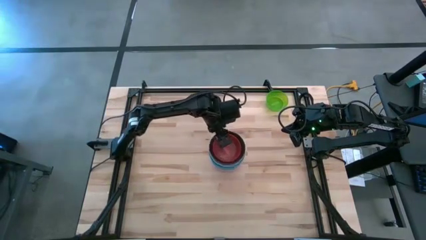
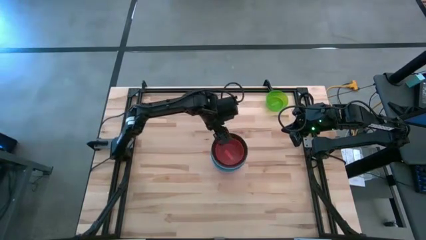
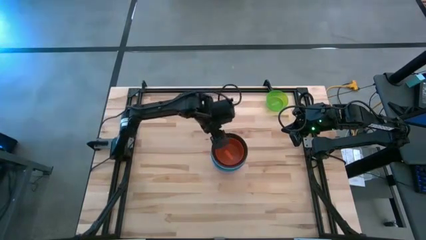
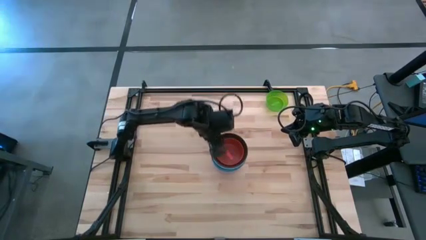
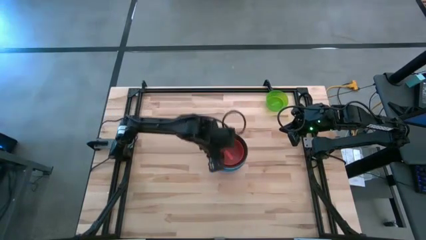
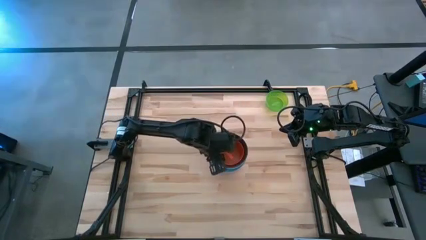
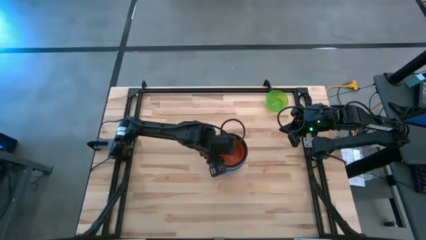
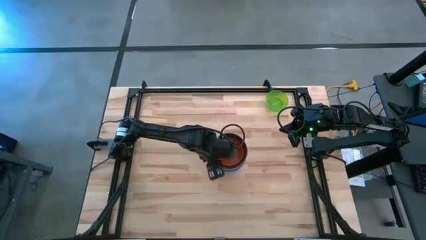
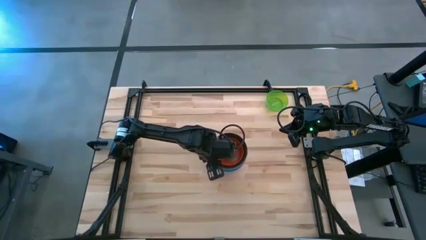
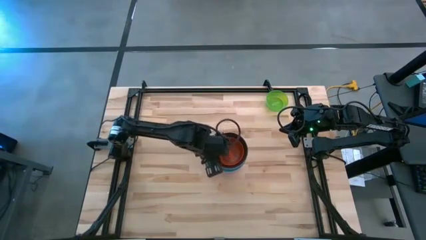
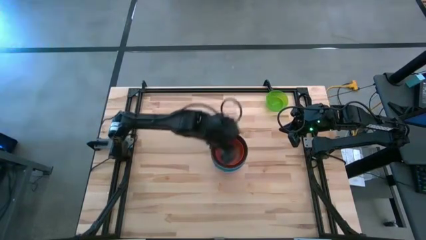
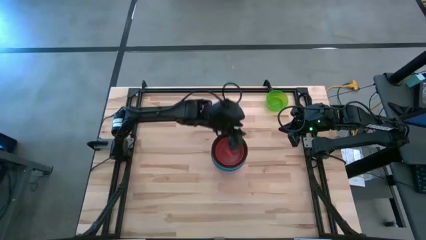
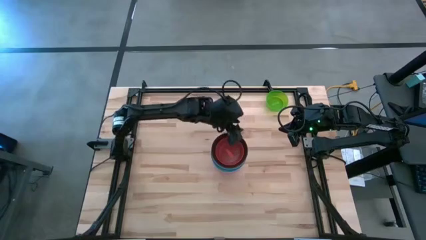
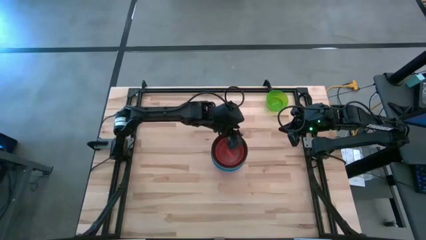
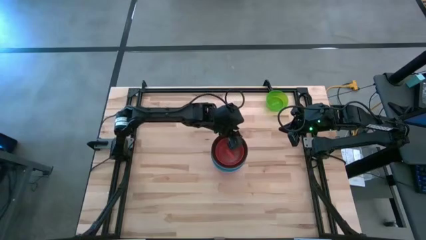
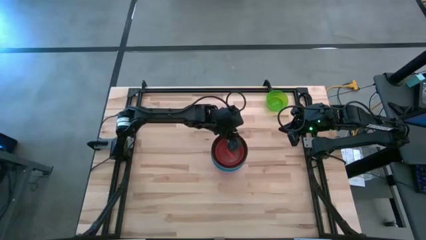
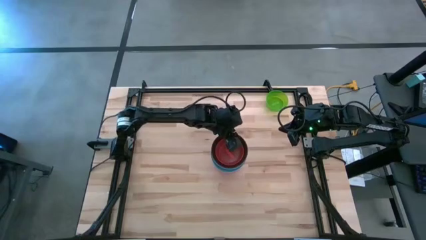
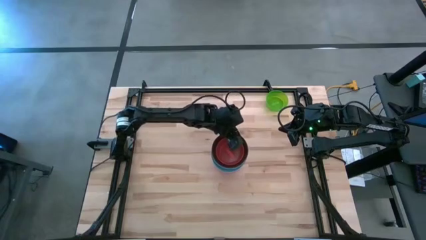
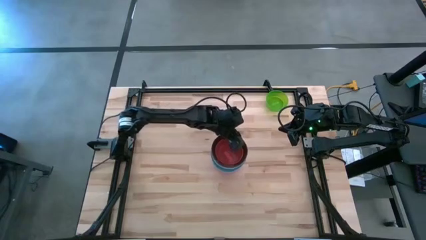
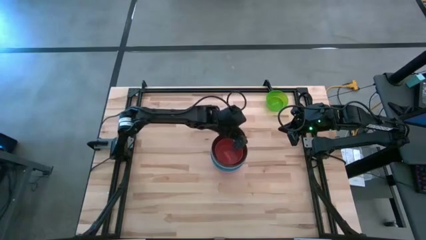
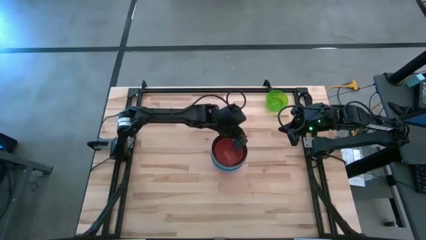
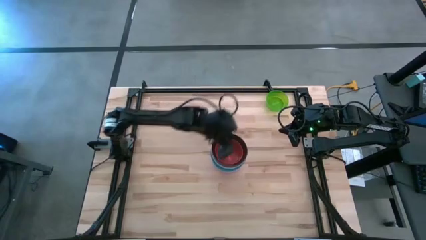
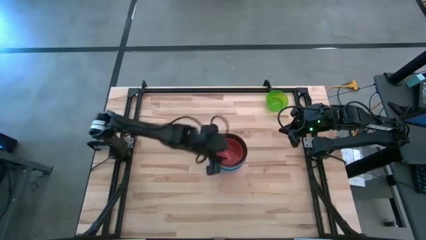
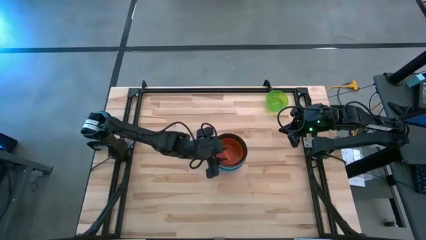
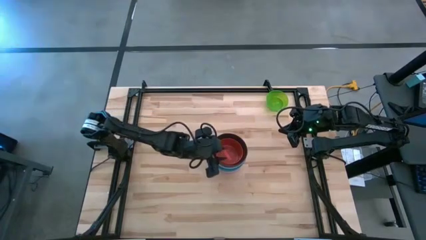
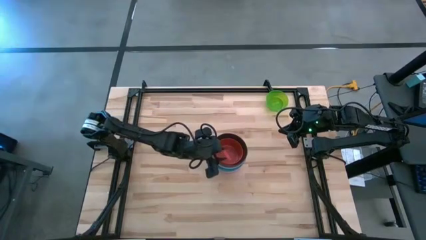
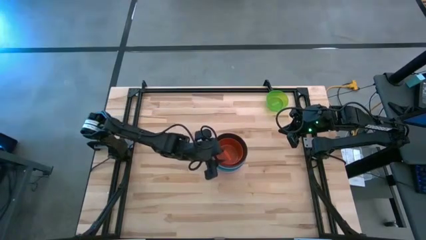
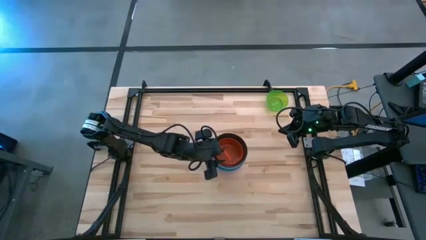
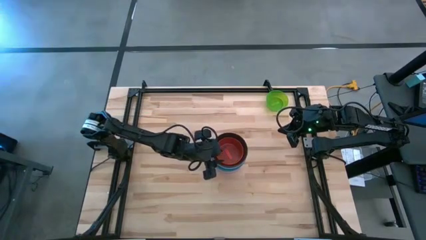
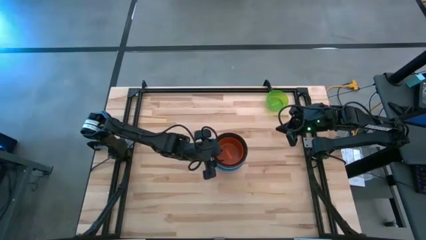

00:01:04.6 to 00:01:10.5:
Task: Nest bowls inside each other
Adjust the stacked bowls

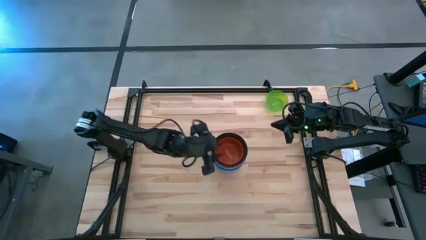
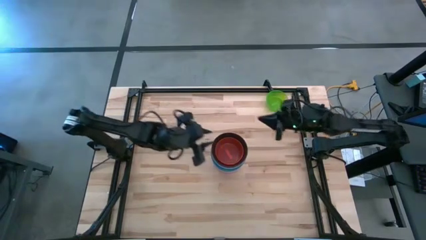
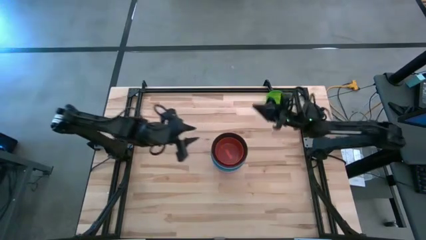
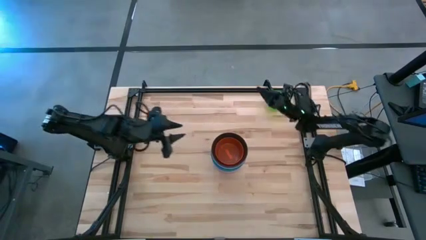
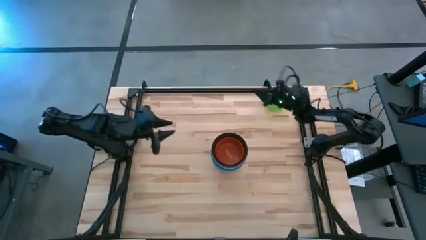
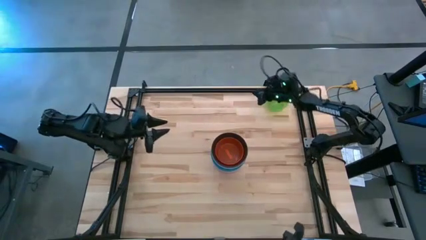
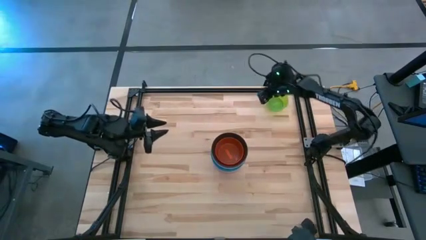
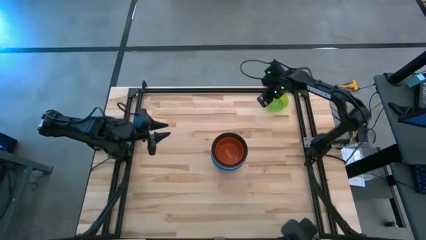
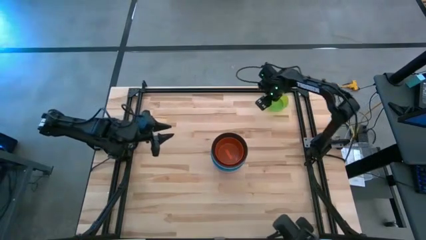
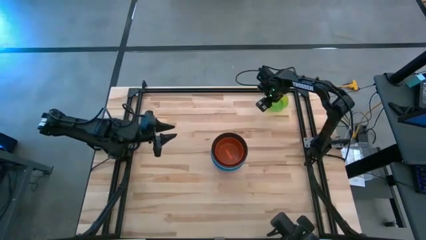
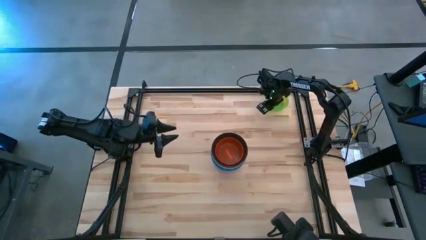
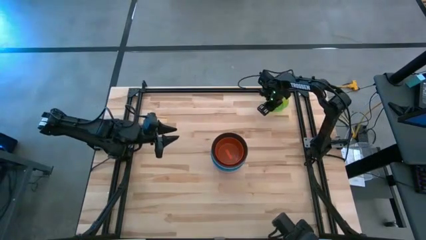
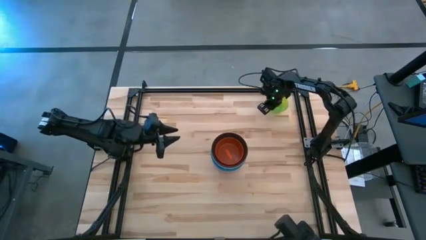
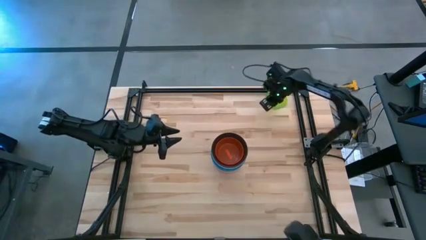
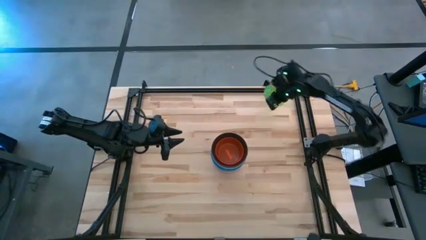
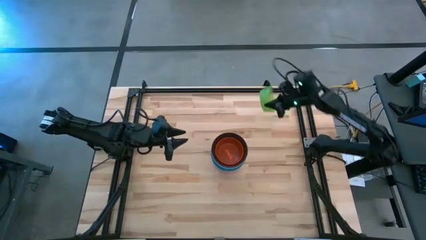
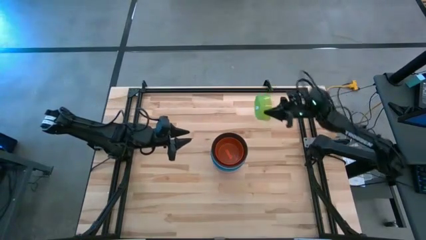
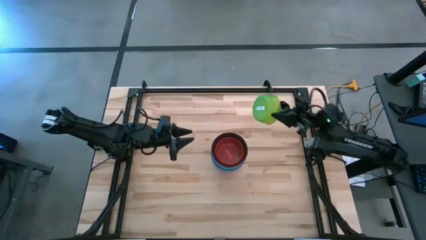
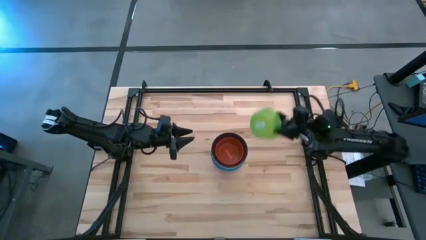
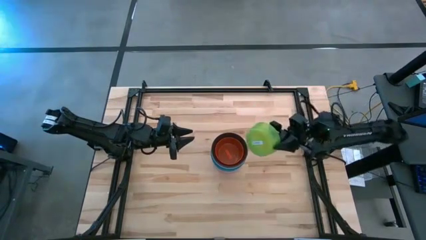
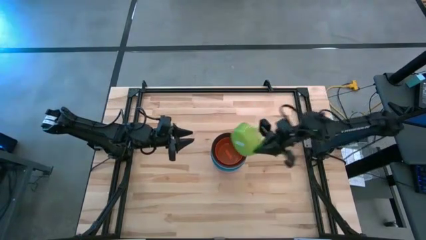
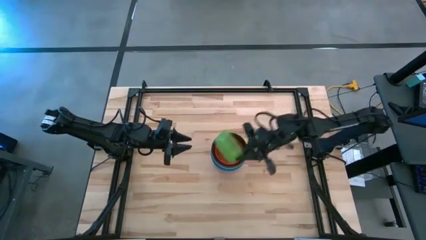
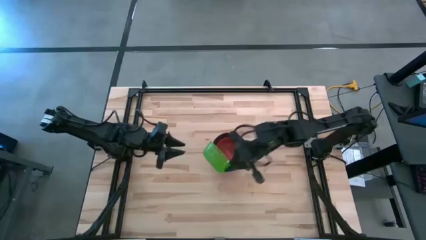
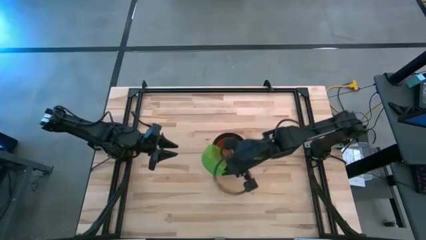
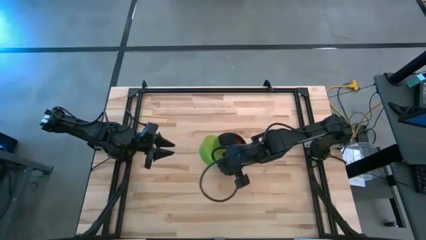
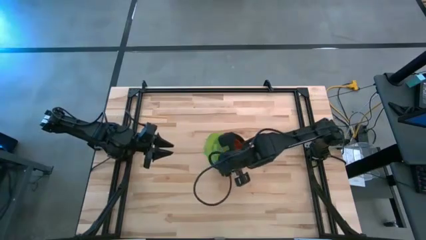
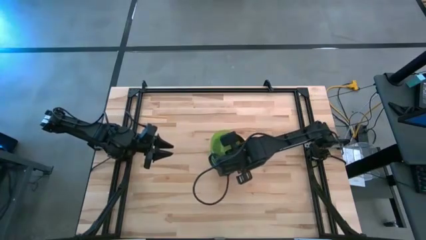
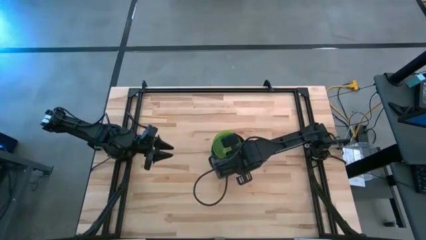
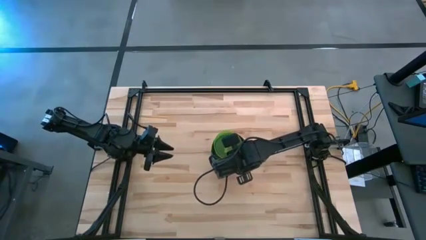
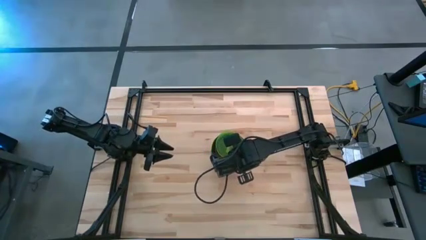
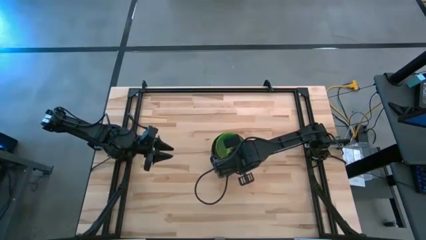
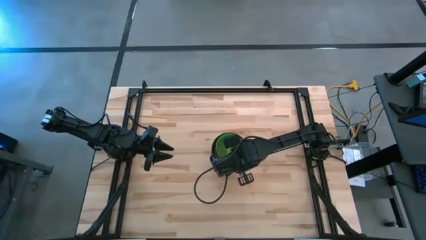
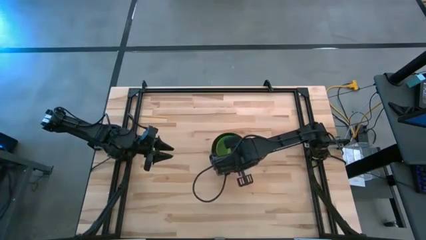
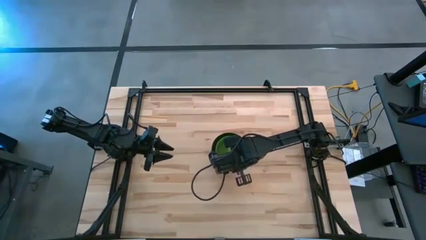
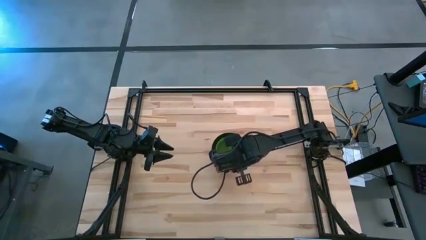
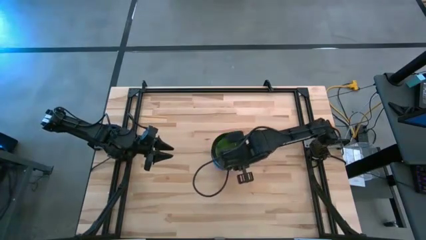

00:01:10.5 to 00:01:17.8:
Stack the small green bowl on top of the small orange bowl

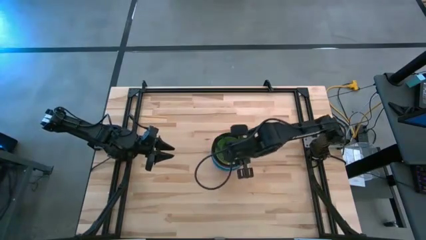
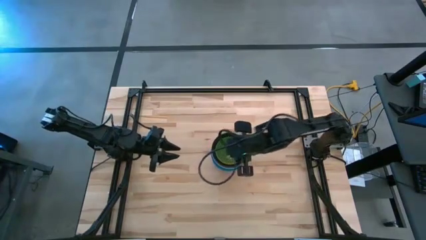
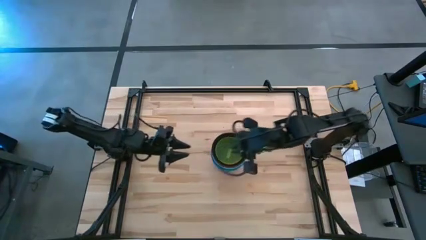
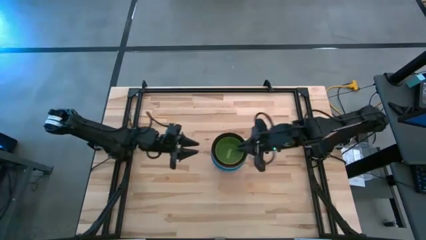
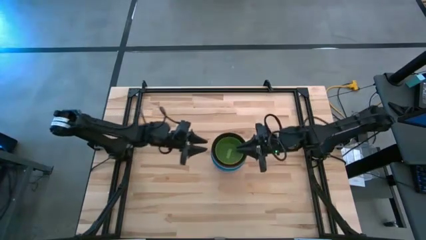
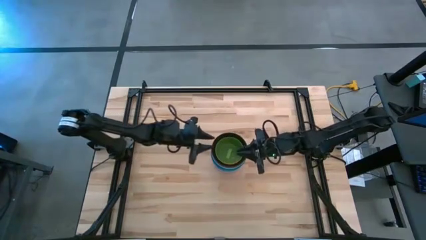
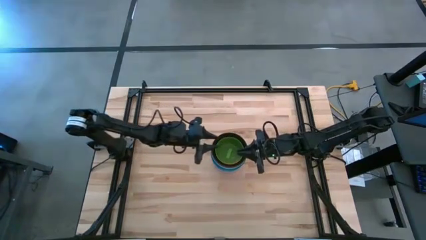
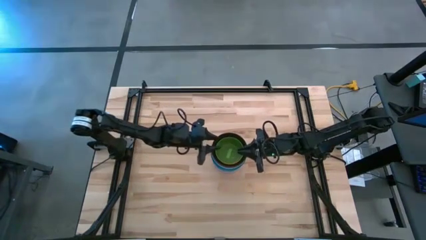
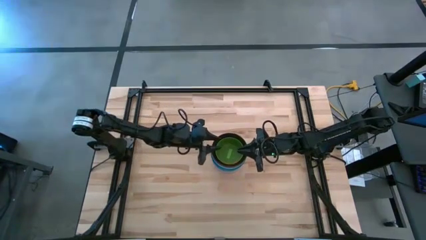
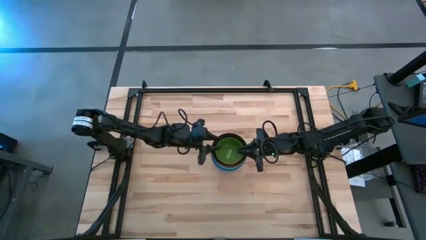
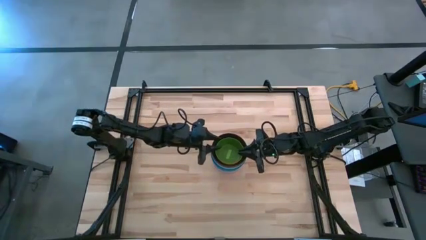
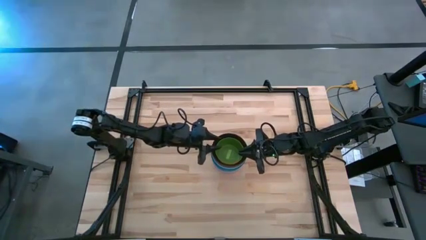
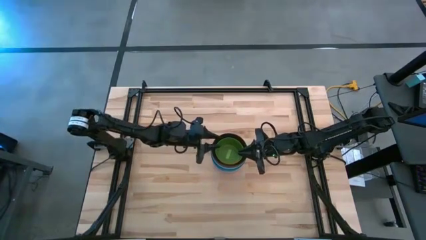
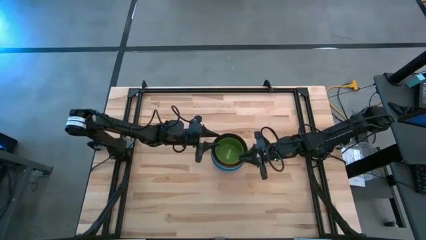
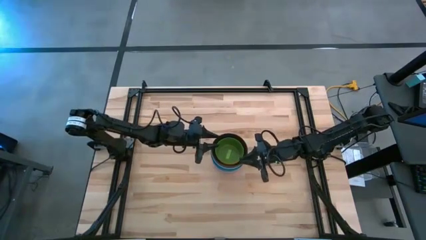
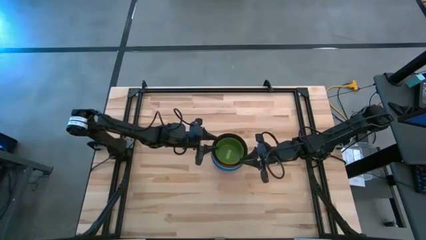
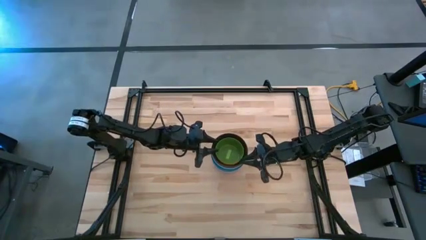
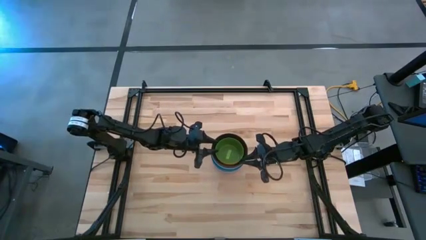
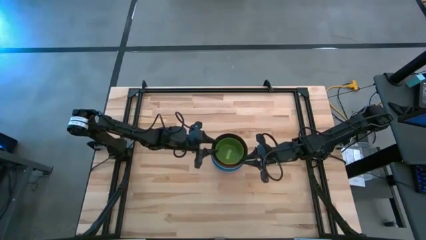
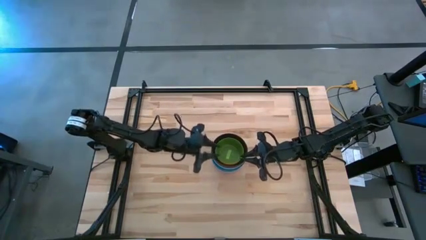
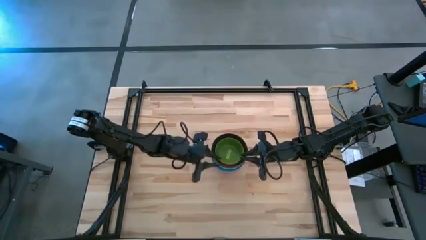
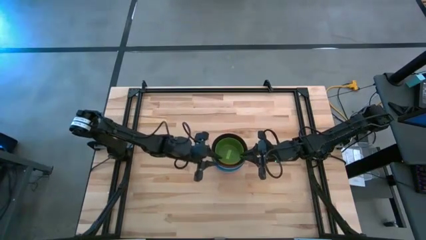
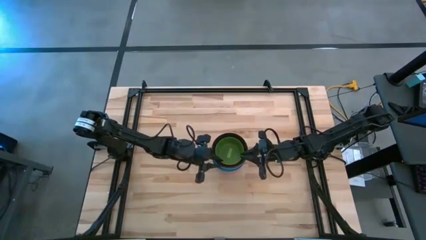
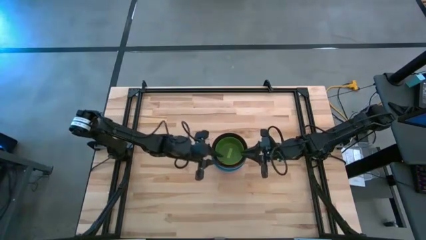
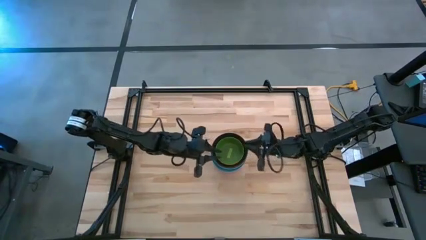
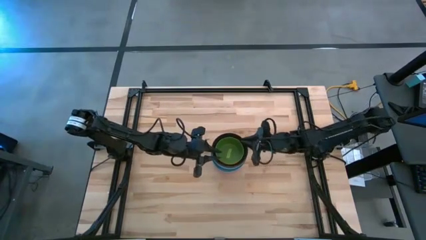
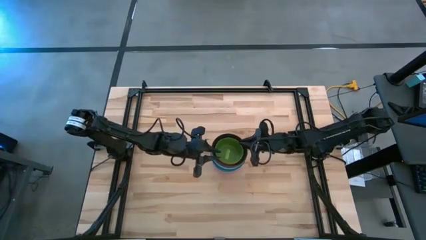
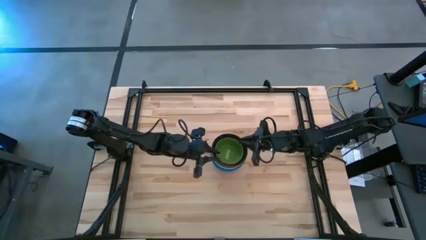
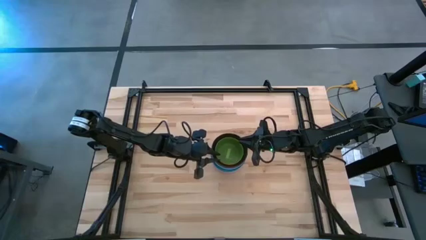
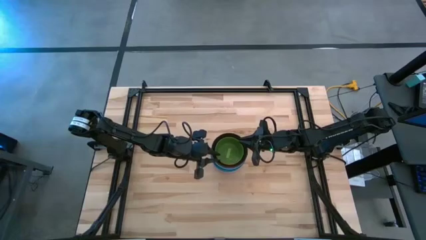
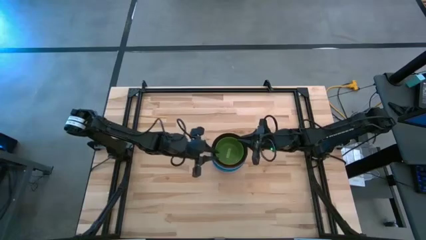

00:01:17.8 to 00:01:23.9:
Adjust the stacked bowls
